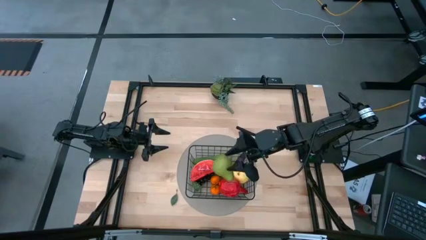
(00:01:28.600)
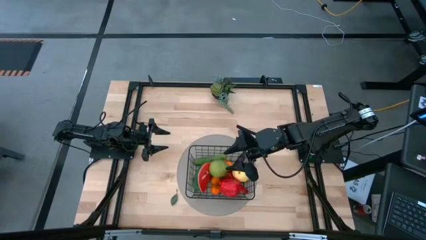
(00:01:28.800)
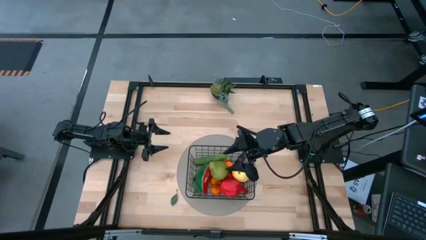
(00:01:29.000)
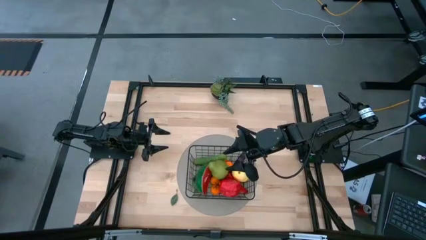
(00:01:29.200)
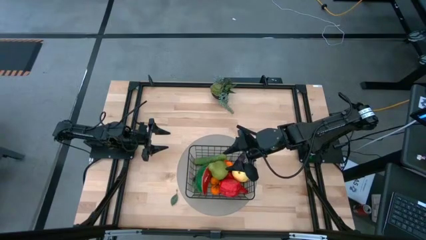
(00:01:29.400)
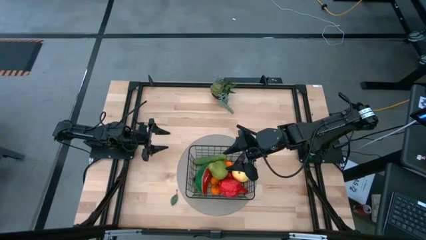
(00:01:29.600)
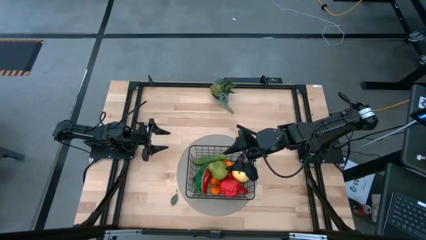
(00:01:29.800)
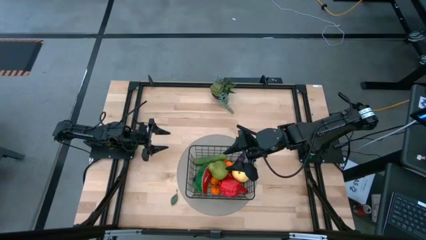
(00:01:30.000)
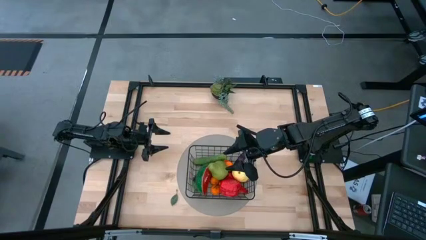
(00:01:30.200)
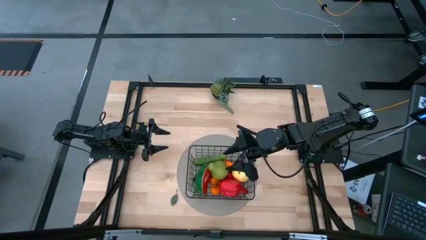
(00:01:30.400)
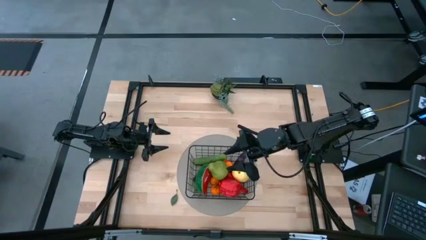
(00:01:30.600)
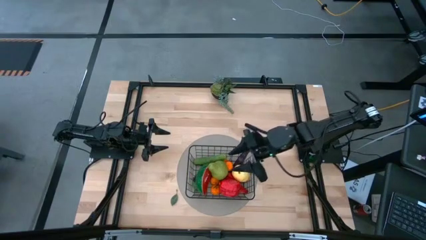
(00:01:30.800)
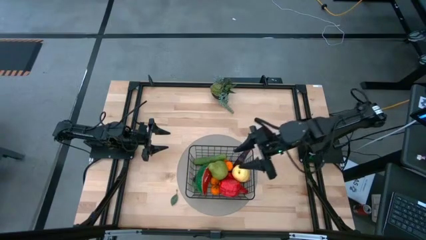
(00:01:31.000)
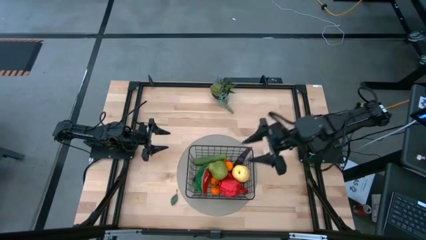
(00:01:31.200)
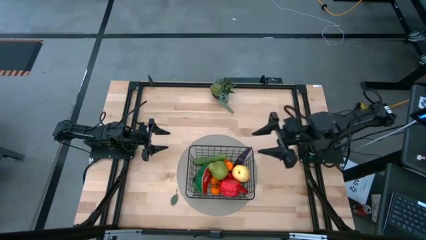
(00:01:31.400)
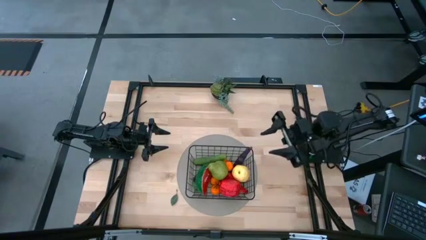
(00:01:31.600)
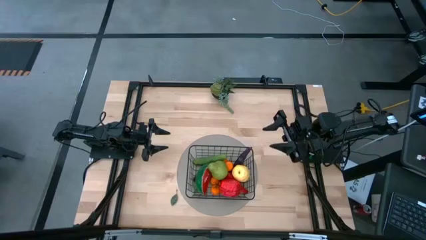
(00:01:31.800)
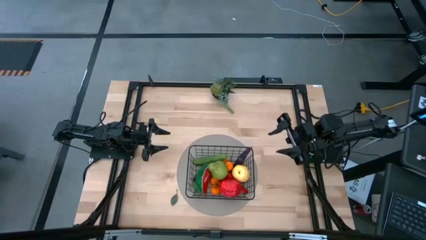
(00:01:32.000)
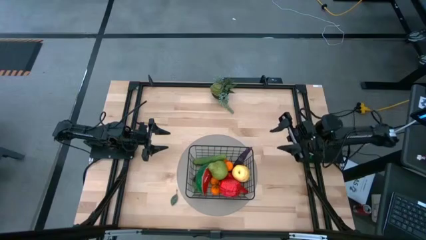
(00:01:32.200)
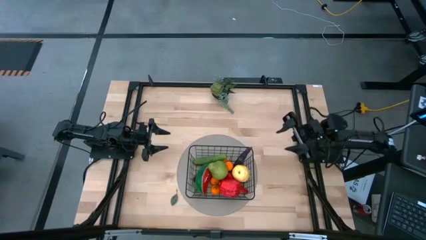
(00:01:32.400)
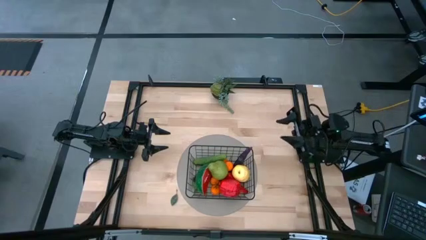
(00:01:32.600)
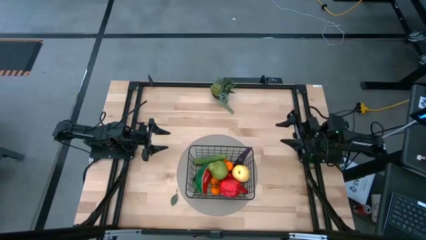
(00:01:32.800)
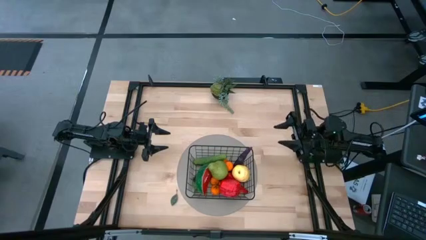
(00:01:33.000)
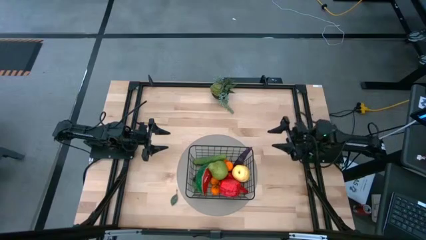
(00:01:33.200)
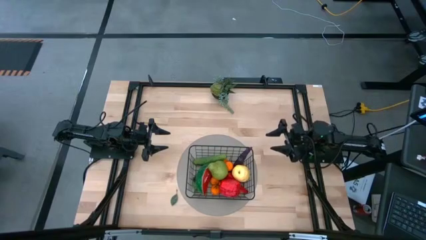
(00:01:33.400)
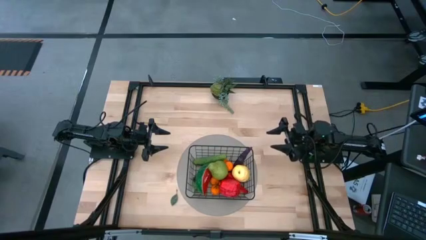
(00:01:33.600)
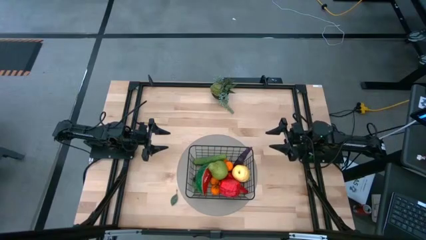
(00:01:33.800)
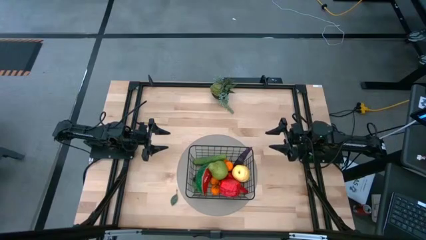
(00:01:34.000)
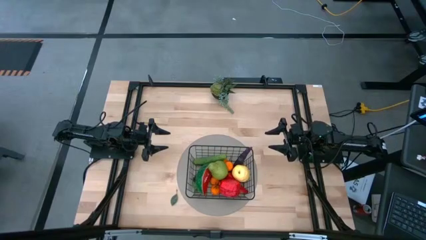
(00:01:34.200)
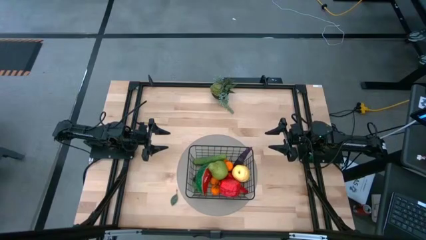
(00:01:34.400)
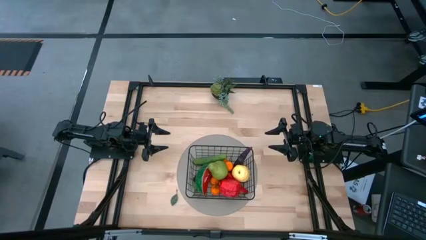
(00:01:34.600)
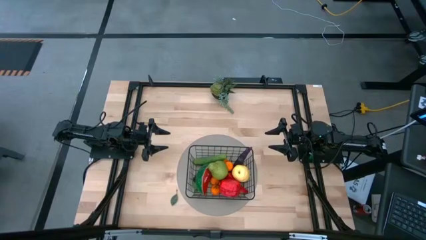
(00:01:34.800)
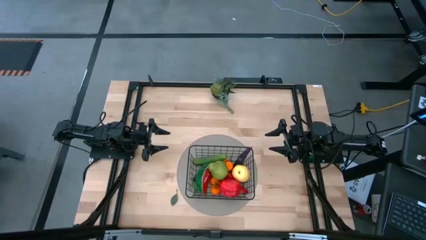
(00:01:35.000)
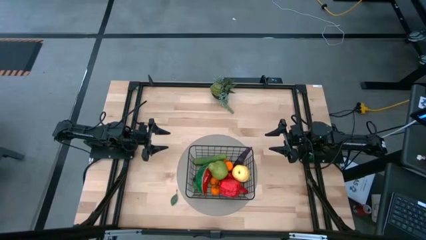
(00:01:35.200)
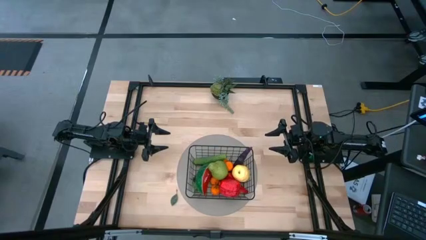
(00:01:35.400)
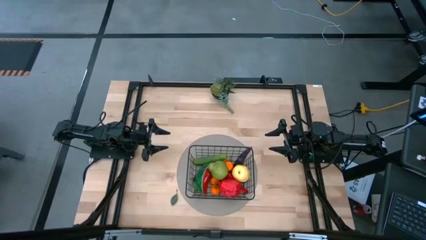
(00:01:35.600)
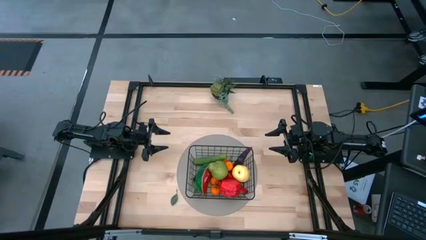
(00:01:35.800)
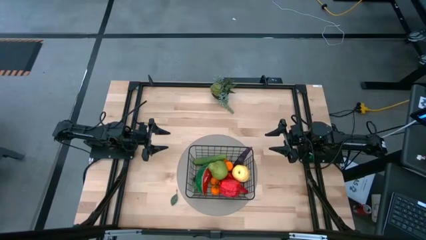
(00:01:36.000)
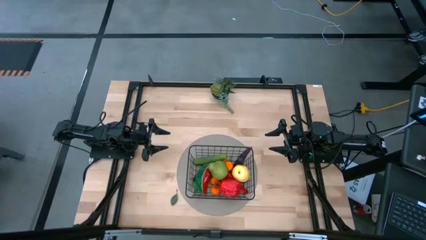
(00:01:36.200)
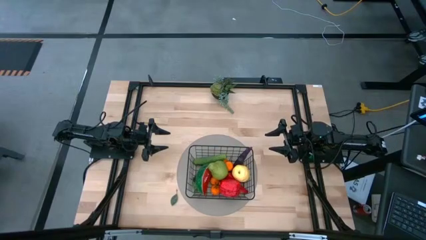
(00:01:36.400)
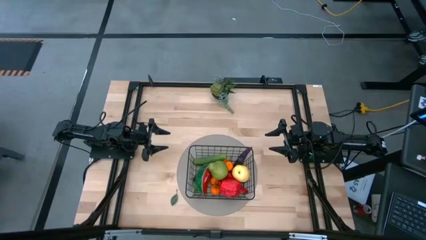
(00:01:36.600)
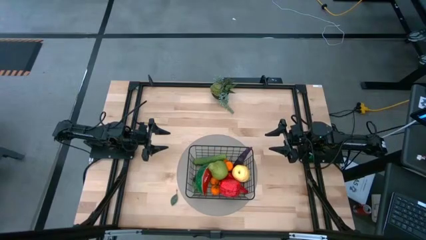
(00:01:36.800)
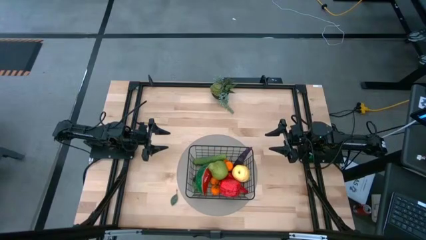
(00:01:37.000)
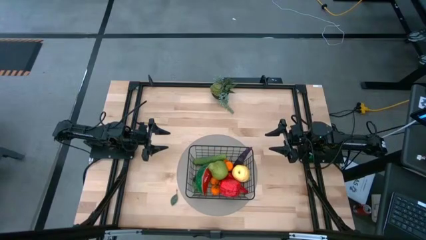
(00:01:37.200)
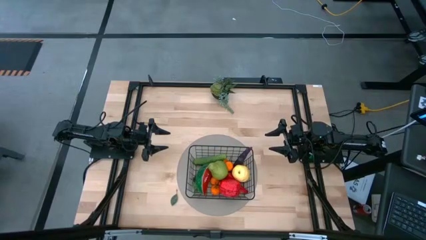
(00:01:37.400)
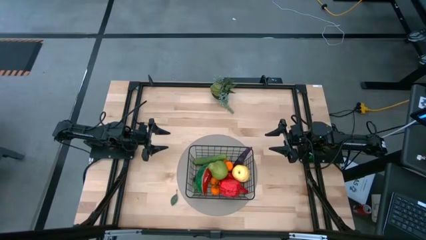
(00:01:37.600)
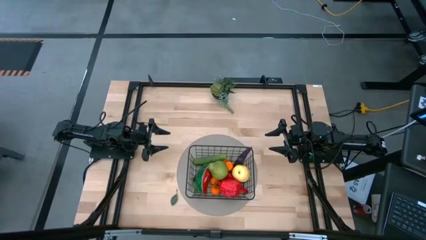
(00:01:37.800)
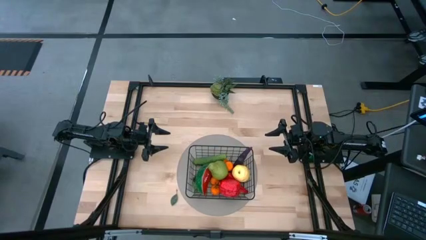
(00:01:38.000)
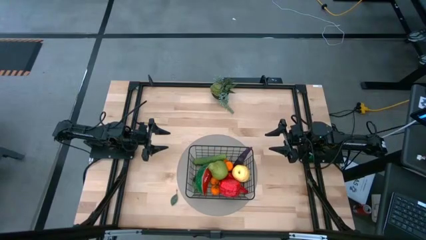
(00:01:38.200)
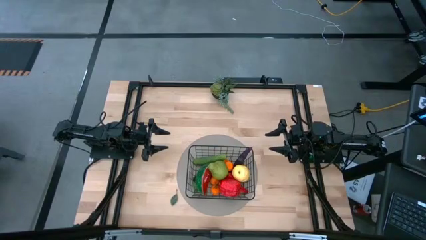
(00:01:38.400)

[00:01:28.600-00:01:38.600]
Task: Build produce basket
Return to Home Position

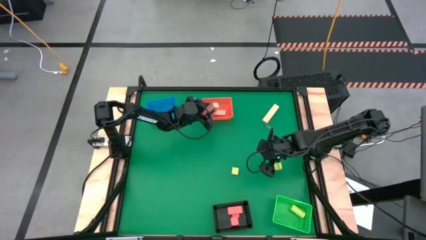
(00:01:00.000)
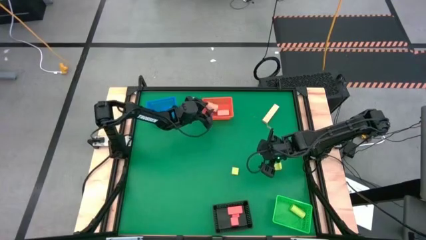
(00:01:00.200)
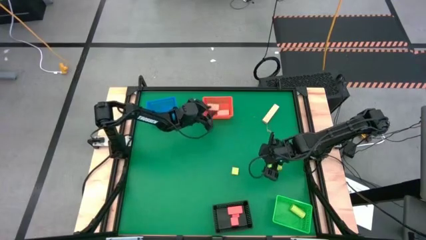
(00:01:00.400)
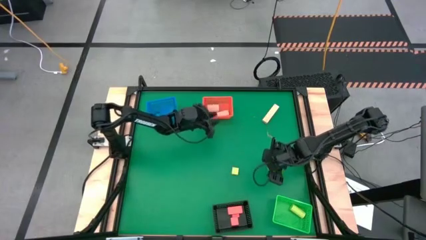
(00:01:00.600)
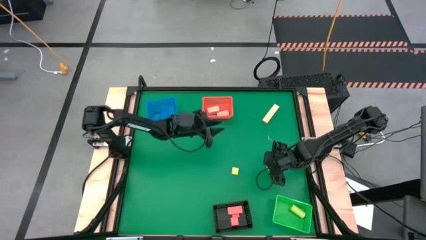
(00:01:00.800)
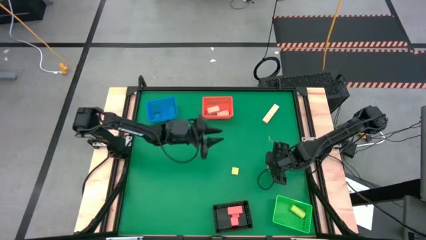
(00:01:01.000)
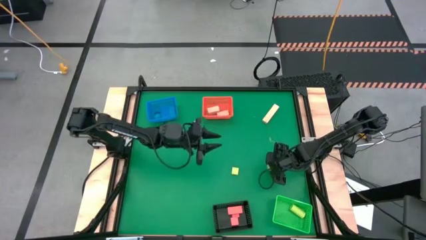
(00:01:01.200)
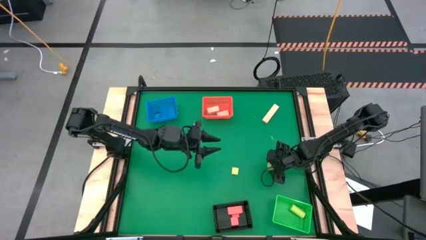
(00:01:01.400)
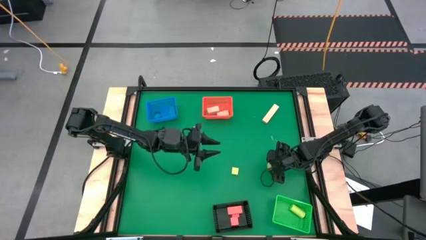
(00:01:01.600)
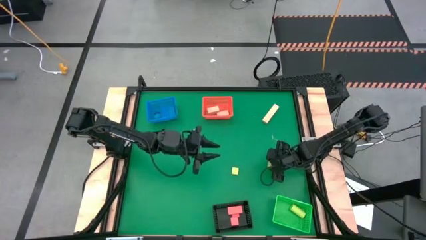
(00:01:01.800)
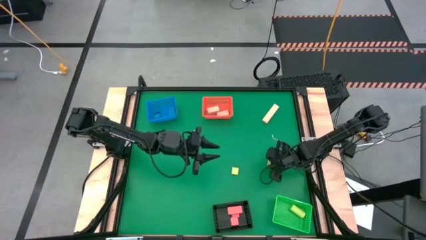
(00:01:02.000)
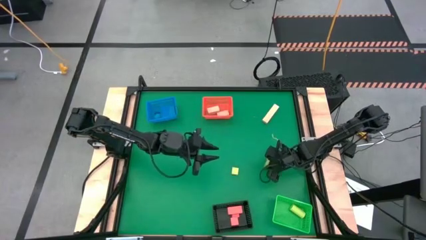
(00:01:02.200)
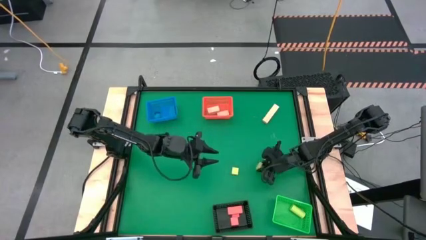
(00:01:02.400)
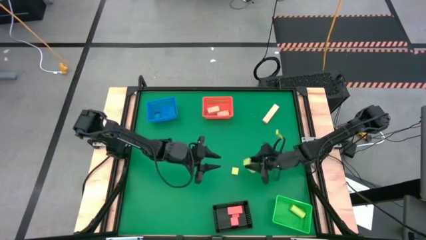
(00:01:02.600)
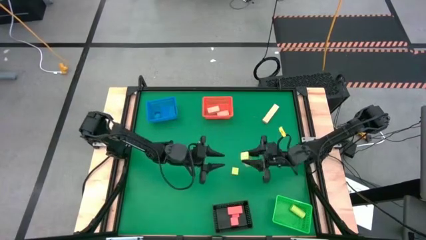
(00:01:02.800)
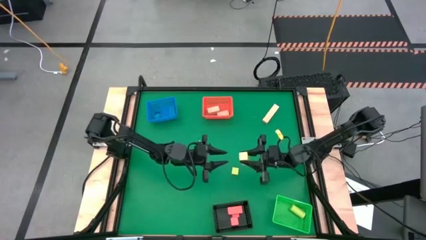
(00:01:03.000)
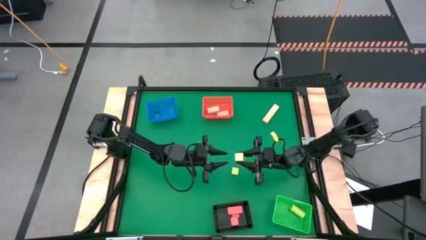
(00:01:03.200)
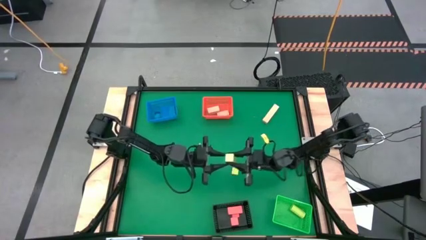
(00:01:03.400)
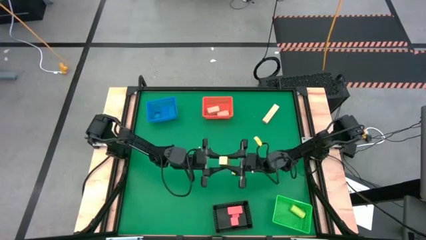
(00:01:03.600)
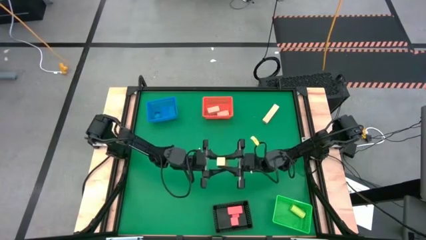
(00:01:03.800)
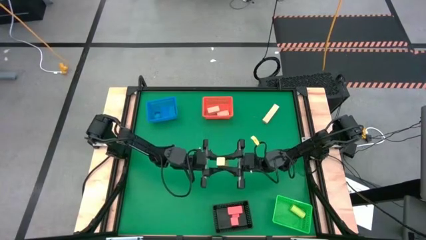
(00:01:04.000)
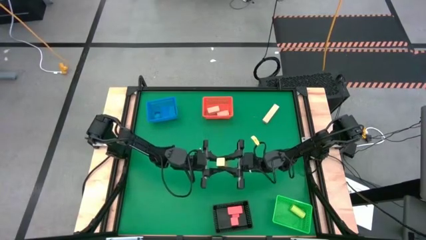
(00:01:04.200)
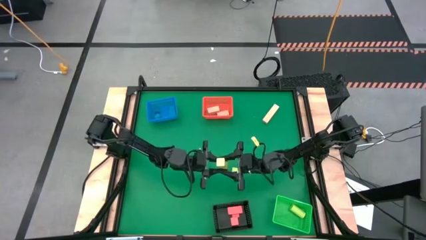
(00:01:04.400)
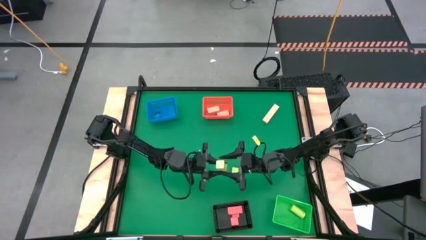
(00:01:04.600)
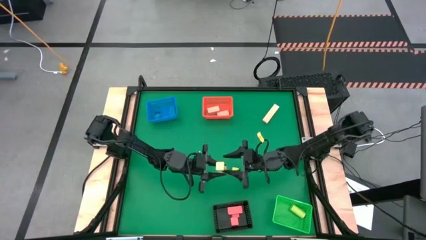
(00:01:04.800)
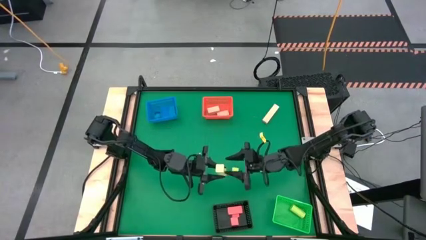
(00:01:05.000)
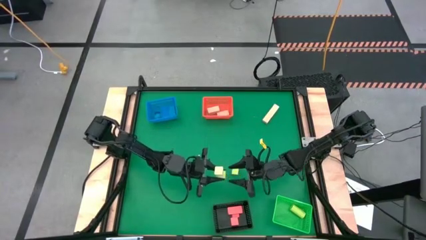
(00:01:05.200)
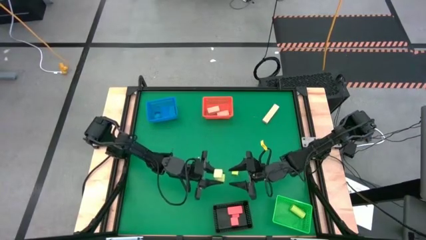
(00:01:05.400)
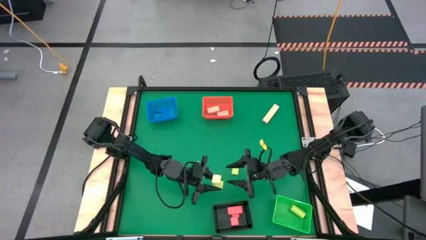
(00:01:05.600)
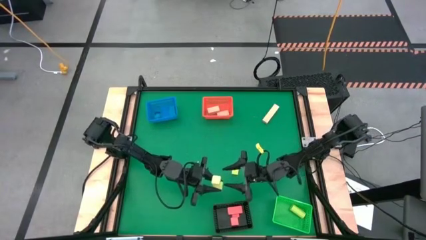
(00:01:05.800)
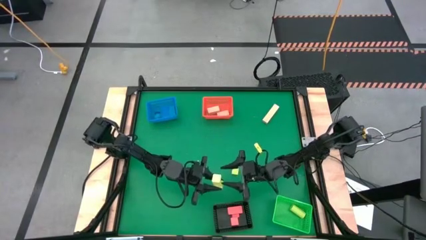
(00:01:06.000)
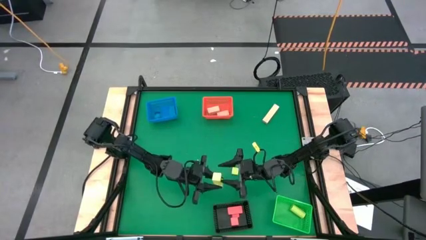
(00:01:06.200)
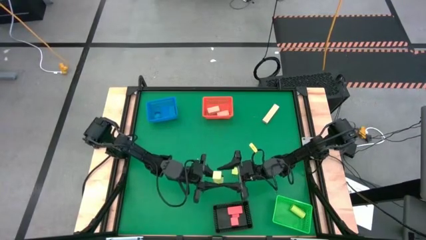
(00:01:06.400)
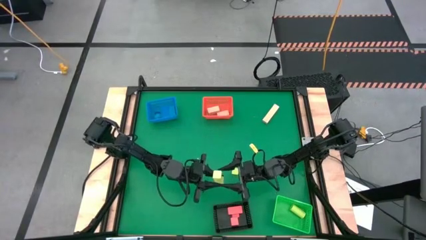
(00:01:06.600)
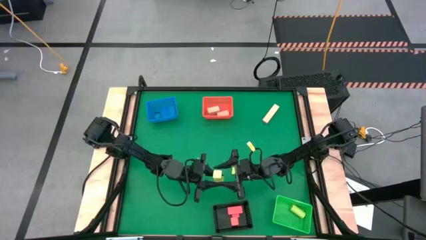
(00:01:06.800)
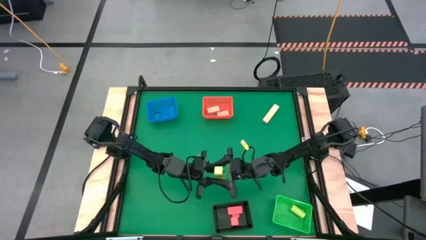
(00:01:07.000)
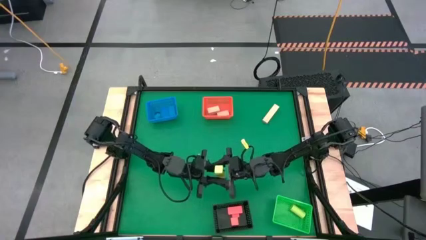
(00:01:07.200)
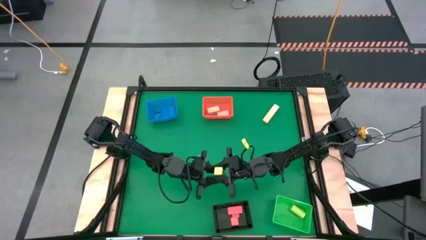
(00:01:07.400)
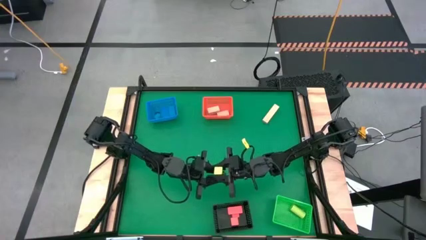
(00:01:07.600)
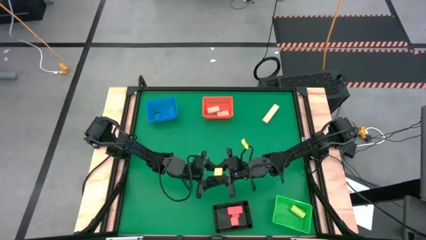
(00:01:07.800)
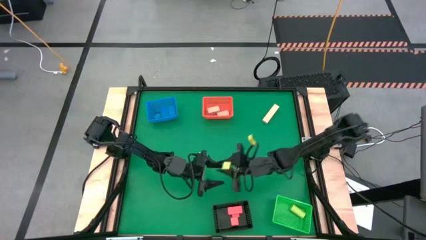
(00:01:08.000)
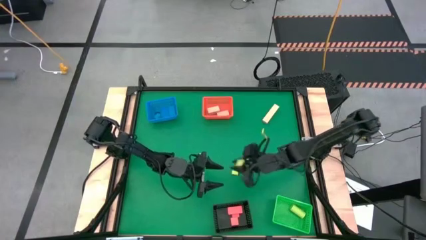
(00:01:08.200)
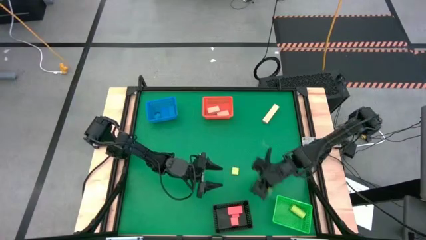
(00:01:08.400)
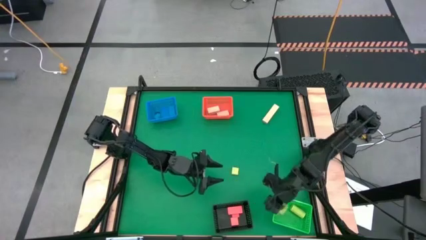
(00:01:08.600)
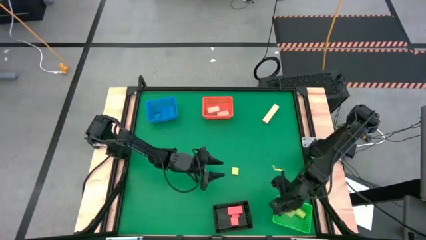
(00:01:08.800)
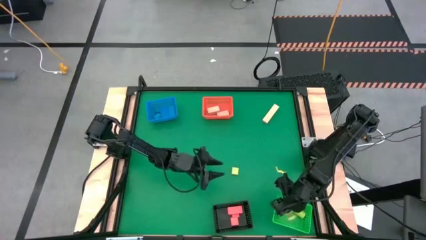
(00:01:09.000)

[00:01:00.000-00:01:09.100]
Task: Sort & place blocks by color
Put the right green block into the green bin
